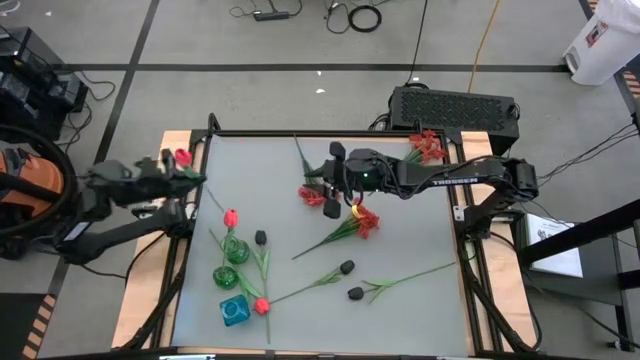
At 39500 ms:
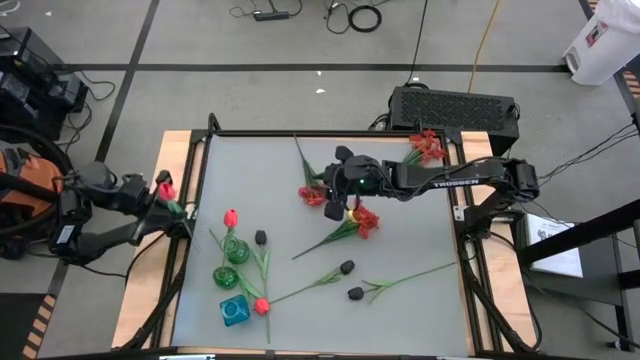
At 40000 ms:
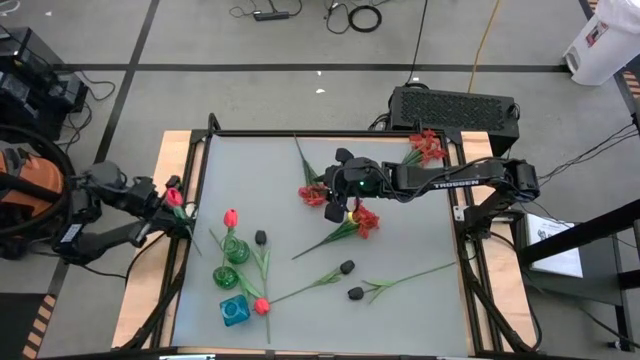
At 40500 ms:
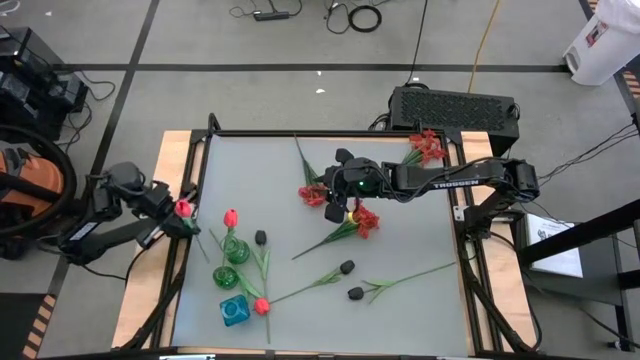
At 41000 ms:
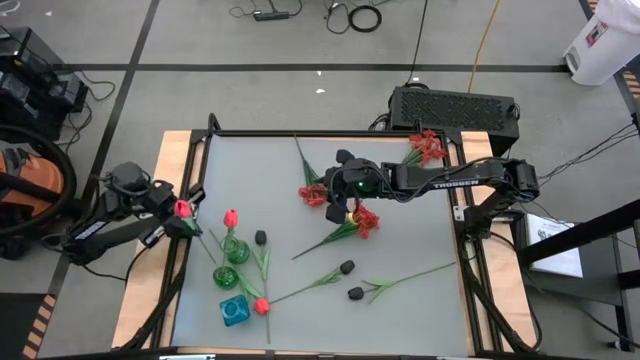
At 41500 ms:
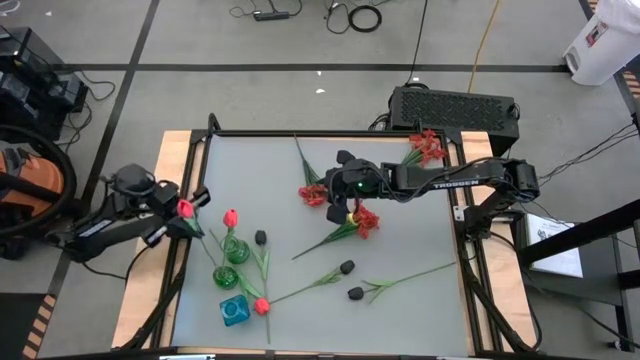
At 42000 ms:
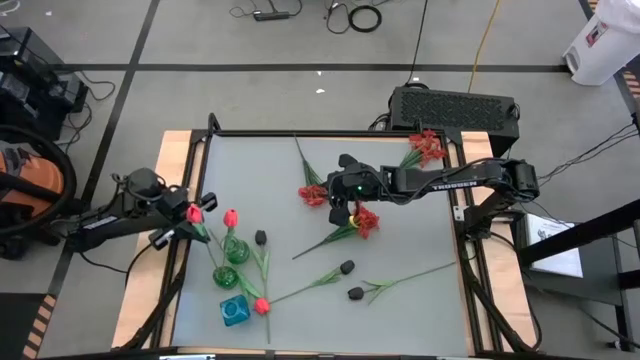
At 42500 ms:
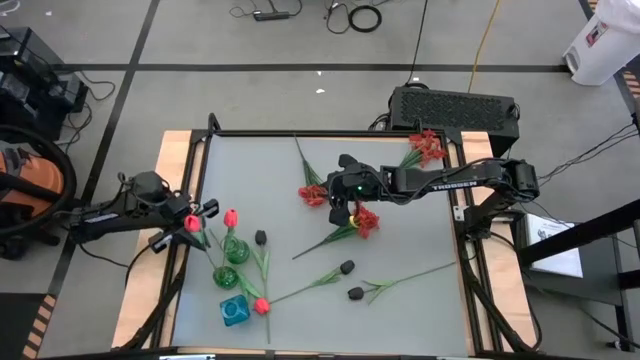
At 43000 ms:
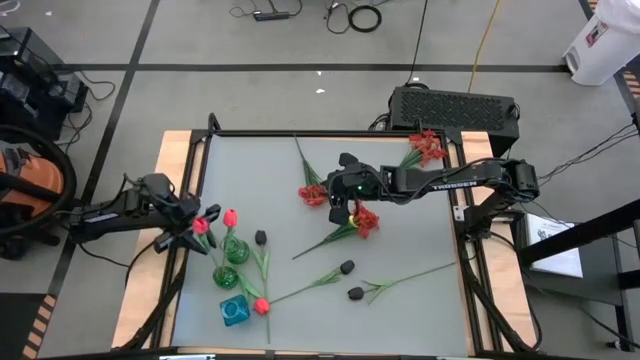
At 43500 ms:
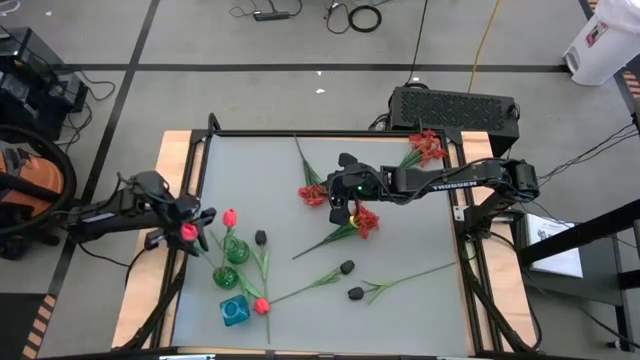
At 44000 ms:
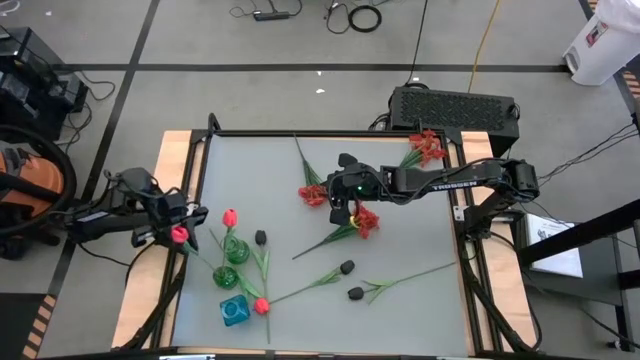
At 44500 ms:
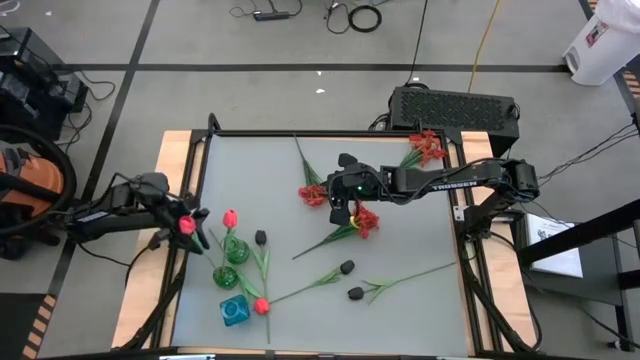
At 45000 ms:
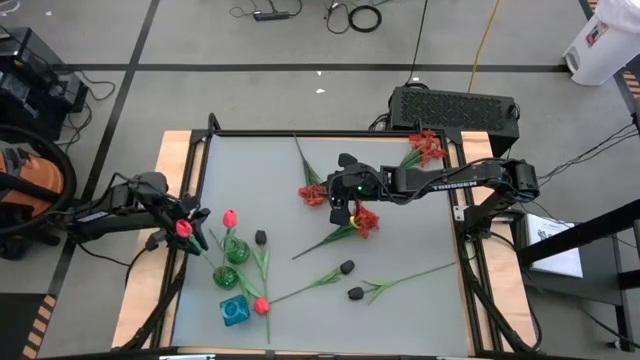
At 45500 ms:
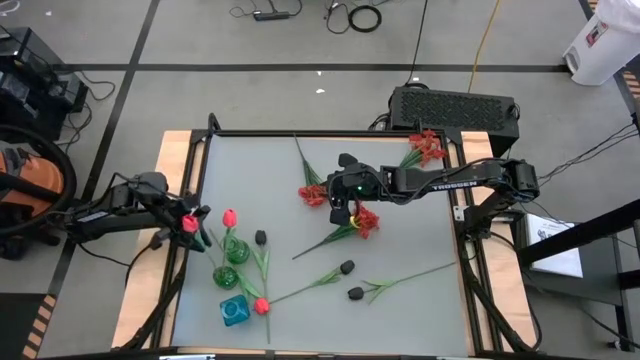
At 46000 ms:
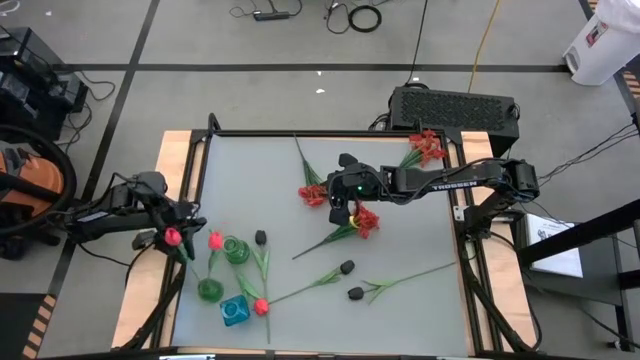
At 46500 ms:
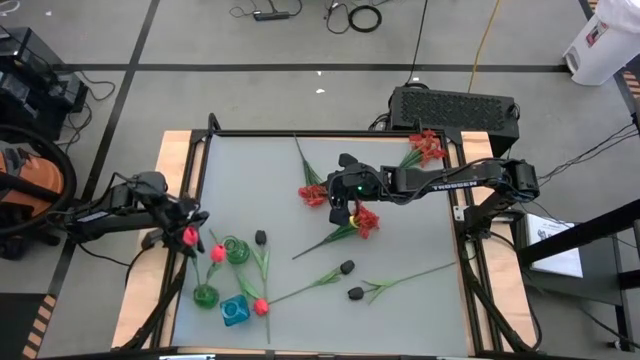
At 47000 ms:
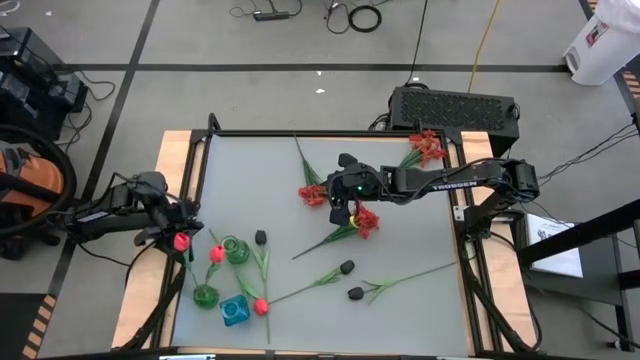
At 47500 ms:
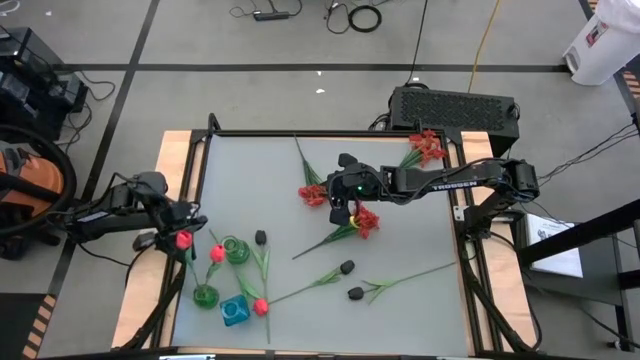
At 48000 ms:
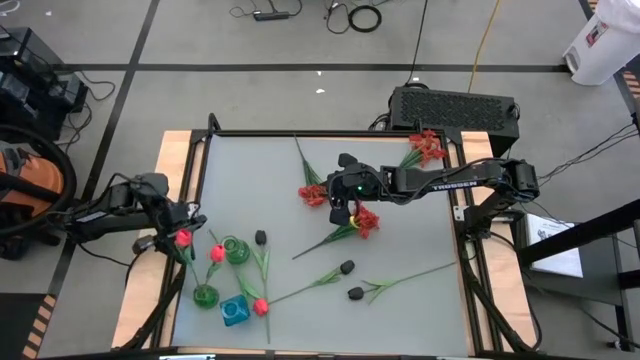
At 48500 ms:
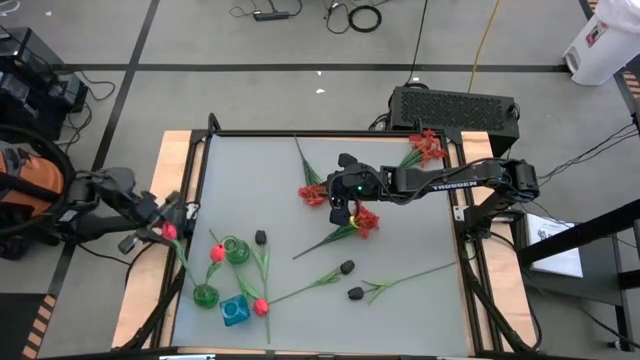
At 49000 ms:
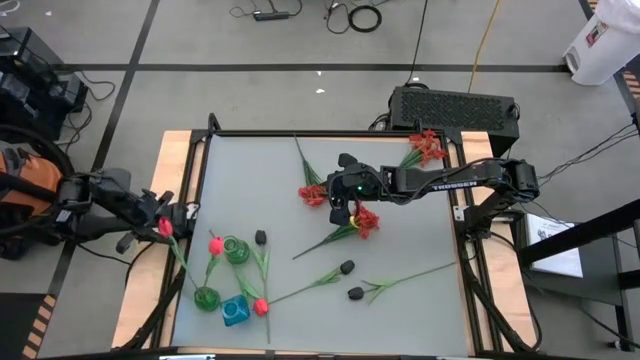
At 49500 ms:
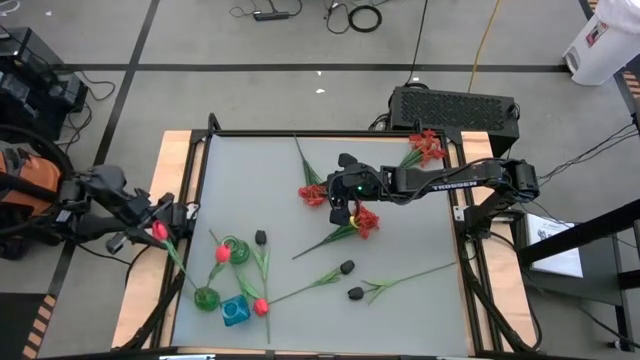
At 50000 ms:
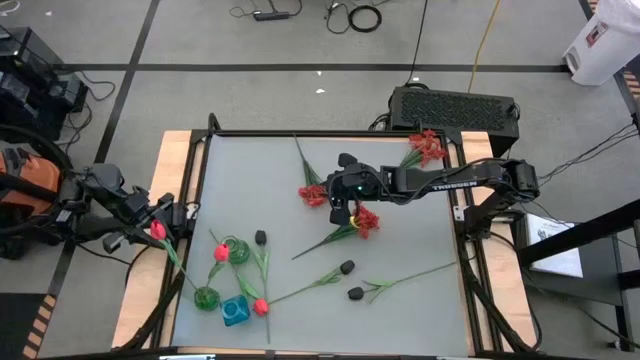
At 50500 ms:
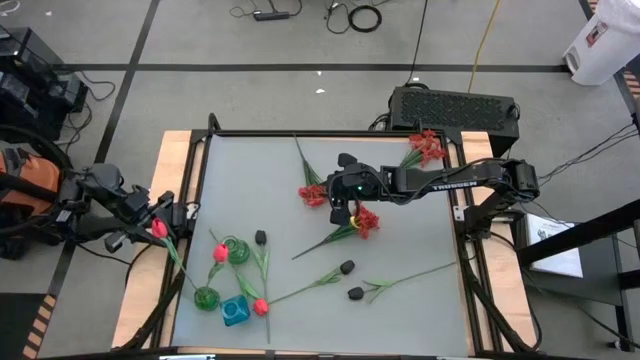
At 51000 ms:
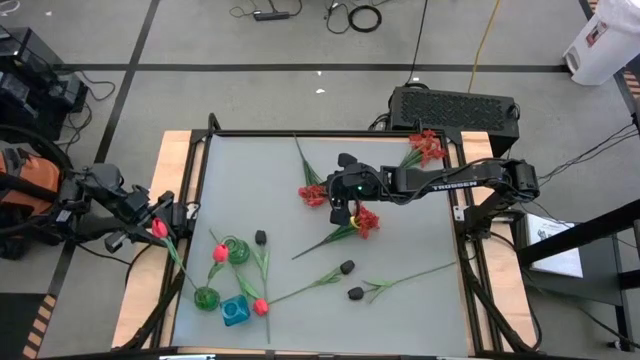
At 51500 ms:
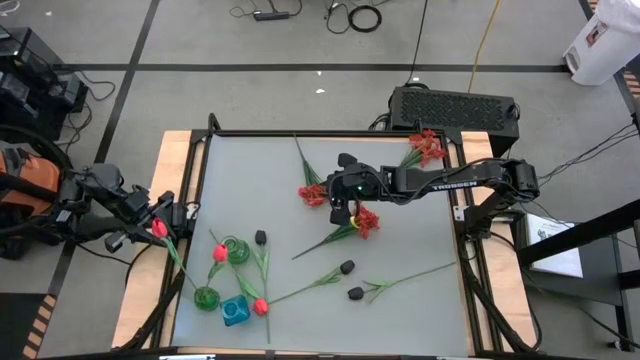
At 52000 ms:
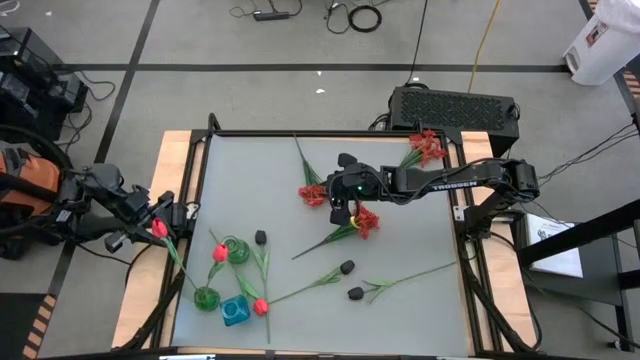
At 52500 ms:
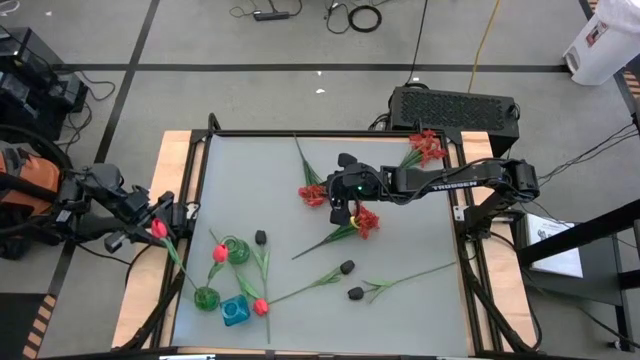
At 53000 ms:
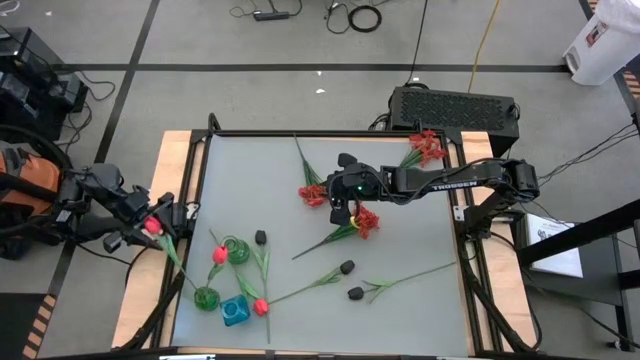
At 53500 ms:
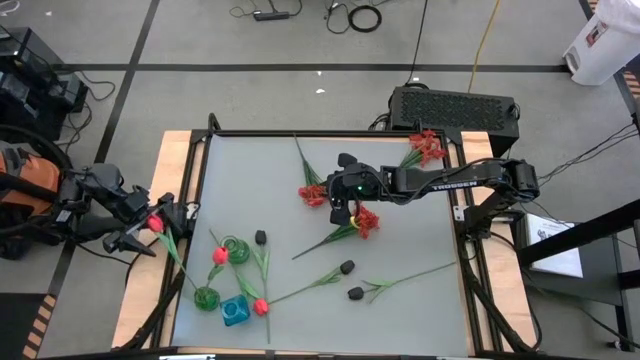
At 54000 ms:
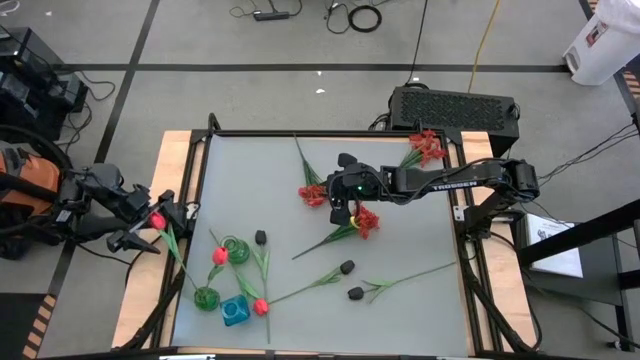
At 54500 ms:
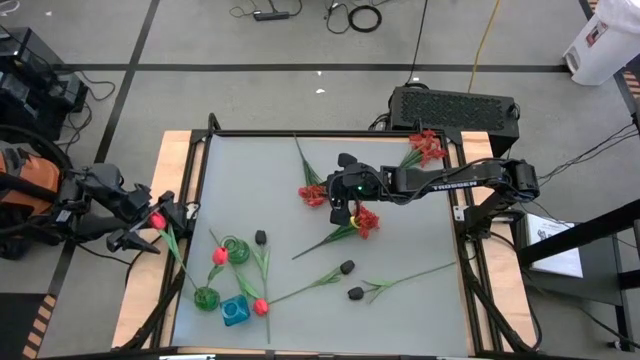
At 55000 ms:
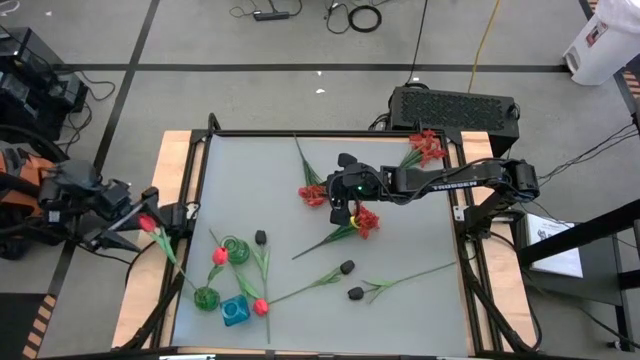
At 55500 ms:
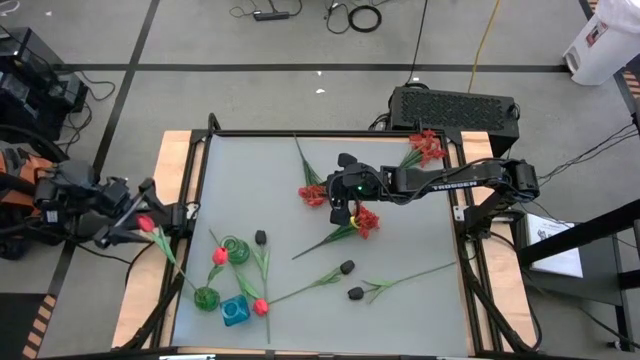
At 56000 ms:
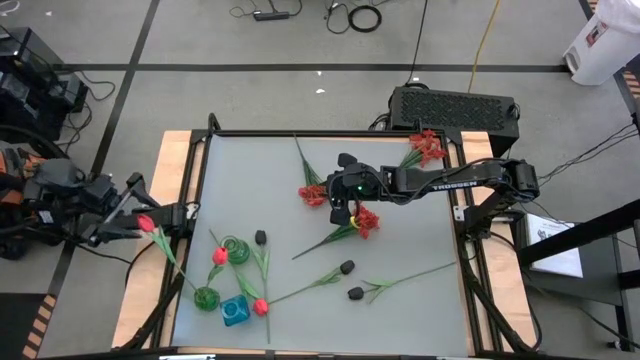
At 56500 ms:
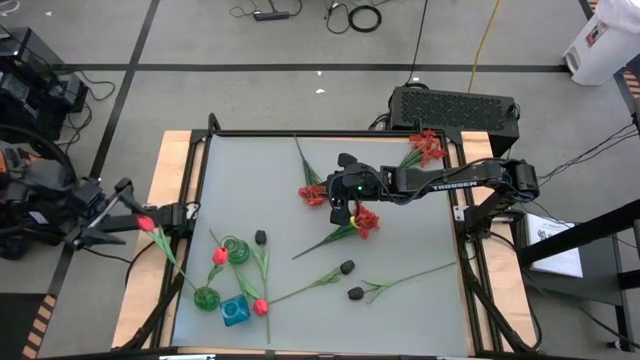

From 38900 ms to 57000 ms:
Task: Sort flowers into vase by color
Put the right light orange flower into the bottom green vase

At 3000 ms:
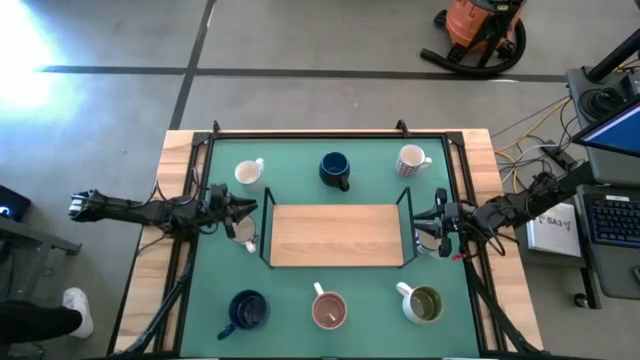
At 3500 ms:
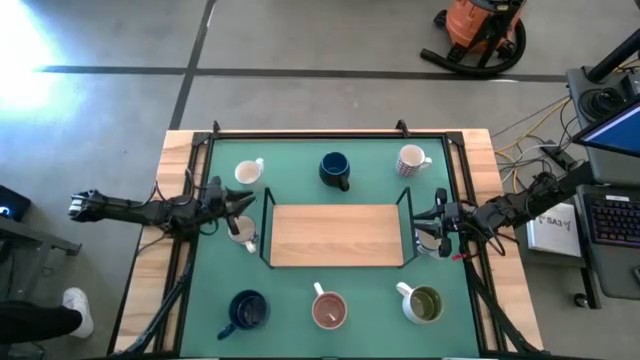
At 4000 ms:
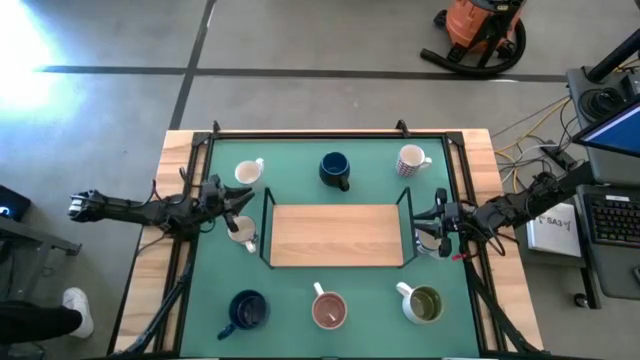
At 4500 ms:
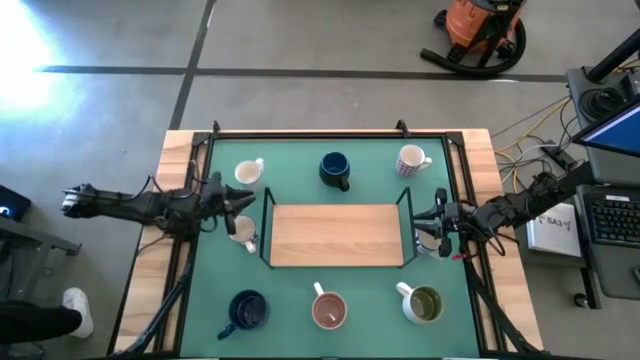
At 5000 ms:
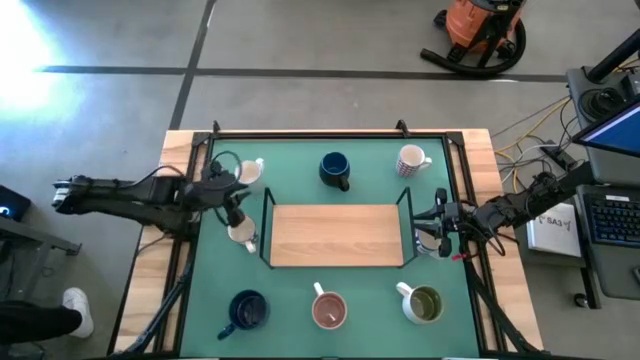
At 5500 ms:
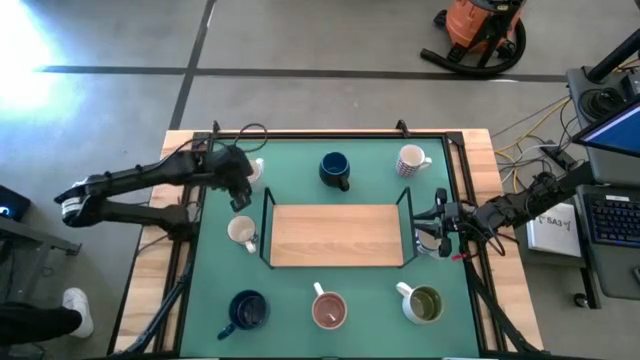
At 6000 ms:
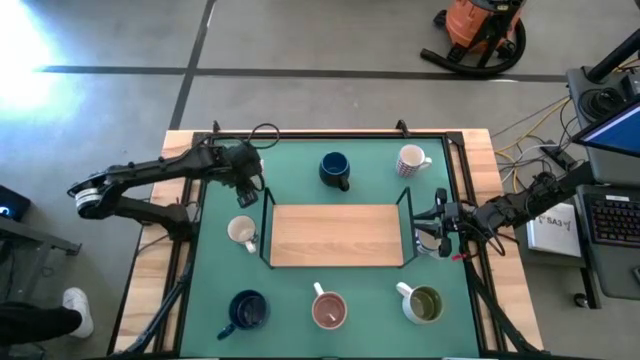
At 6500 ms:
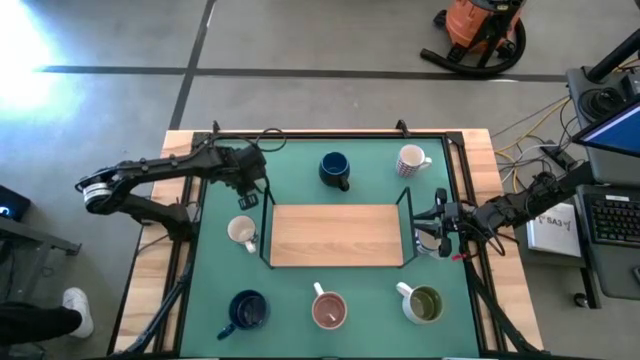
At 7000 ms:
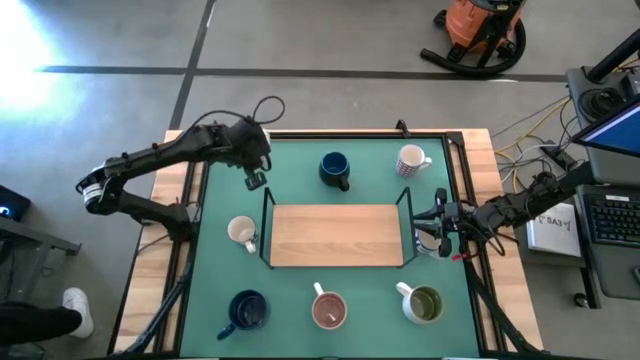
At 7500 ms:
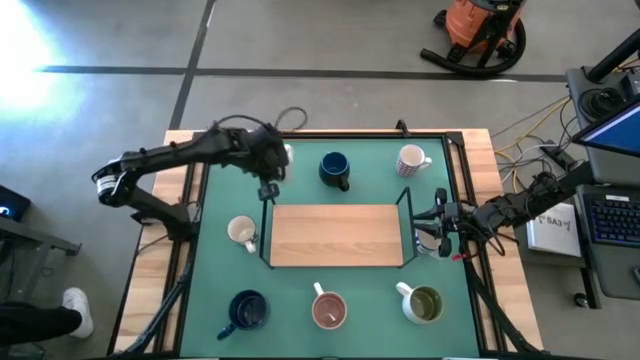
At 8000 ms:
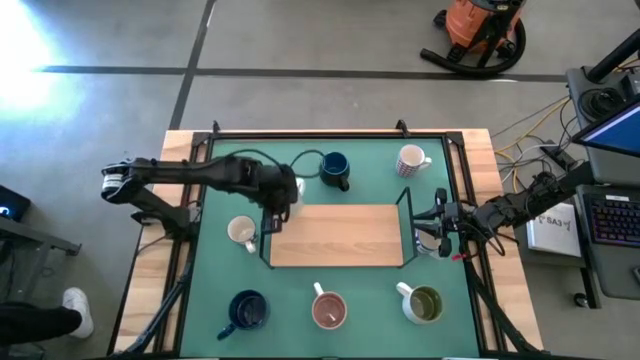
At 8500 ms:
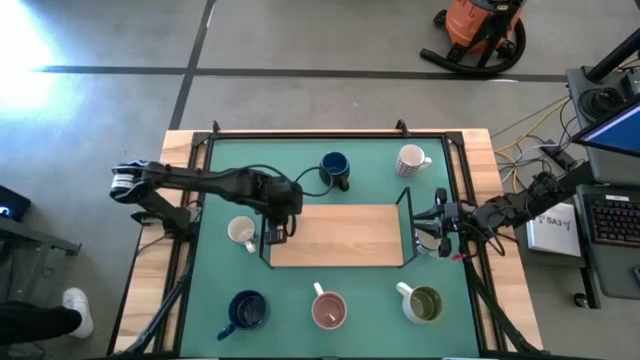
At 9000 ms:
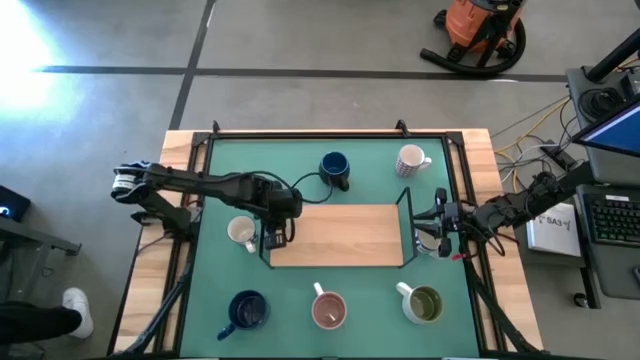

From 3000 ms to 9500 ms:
Task: Place coffee mugs
Put the green patterned mug on the shelf
